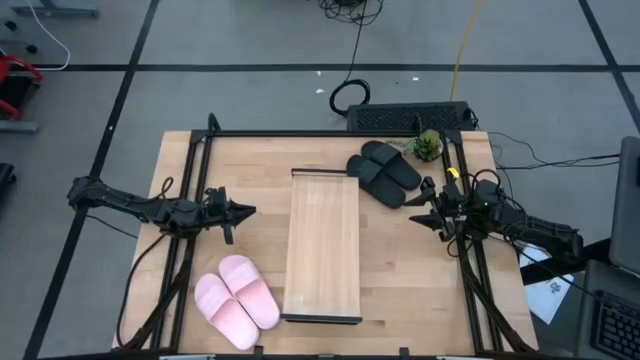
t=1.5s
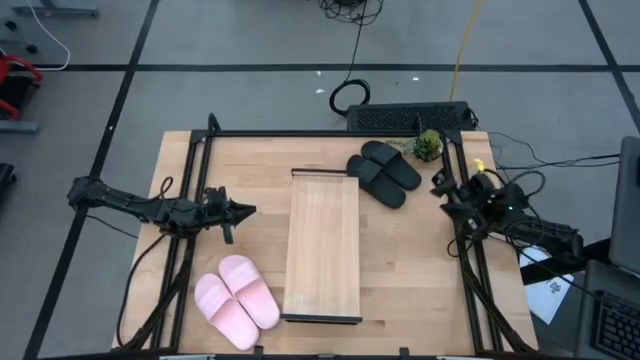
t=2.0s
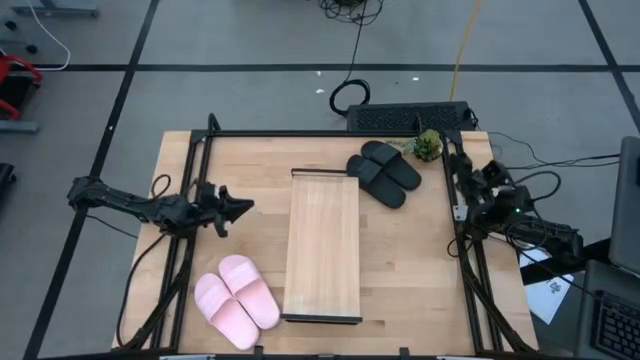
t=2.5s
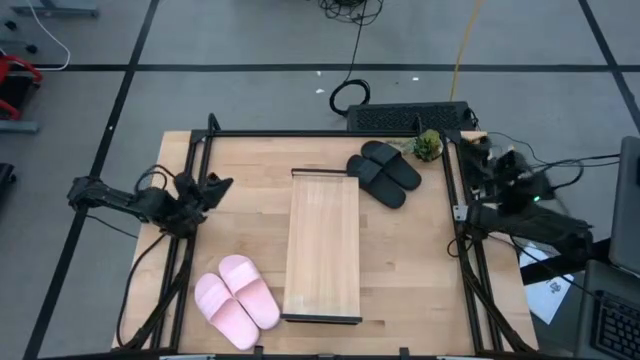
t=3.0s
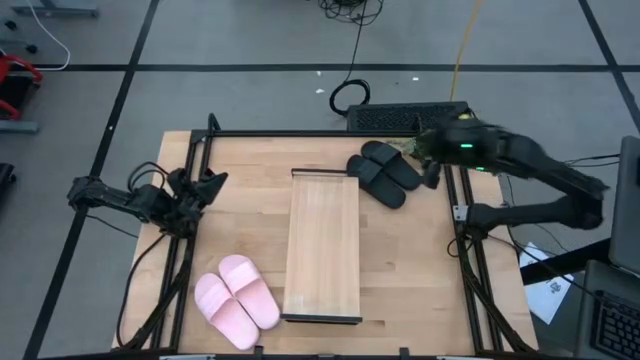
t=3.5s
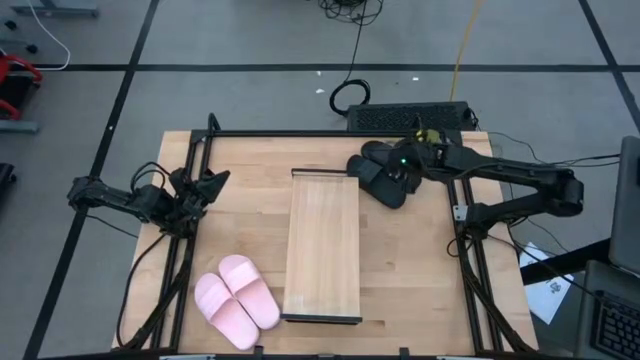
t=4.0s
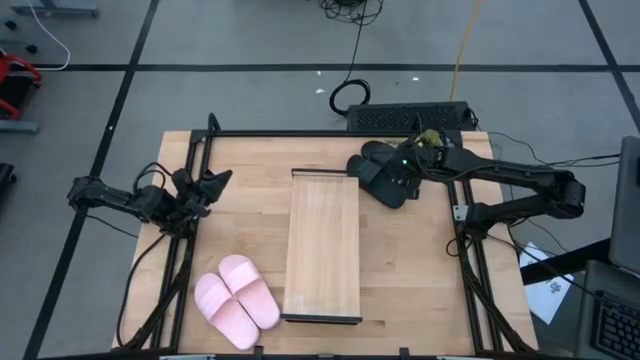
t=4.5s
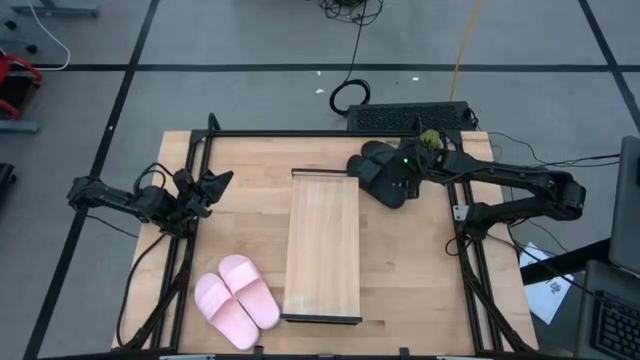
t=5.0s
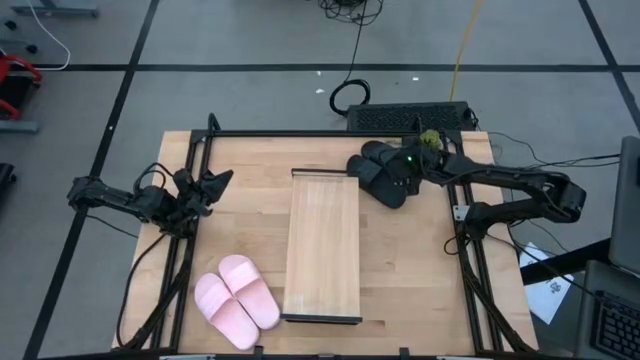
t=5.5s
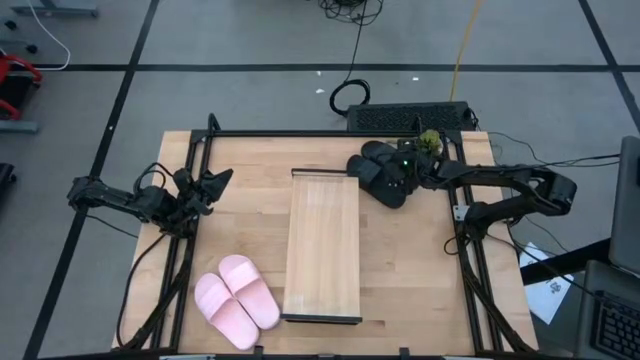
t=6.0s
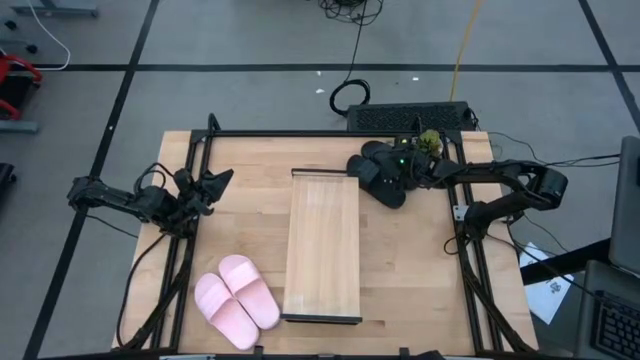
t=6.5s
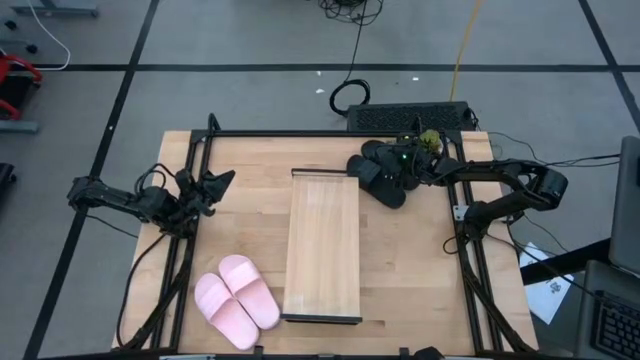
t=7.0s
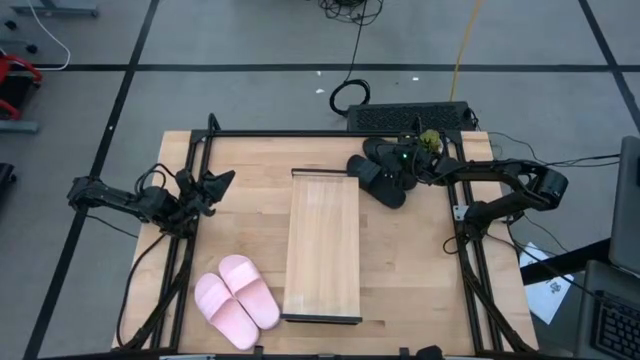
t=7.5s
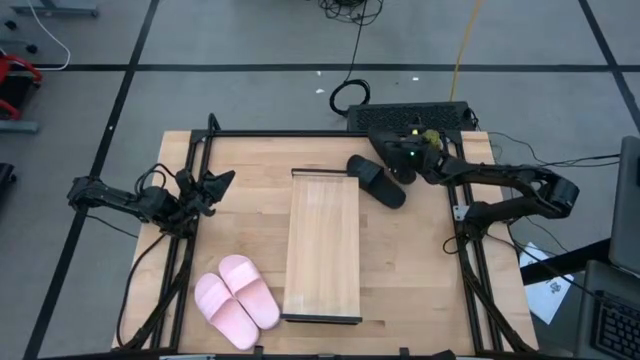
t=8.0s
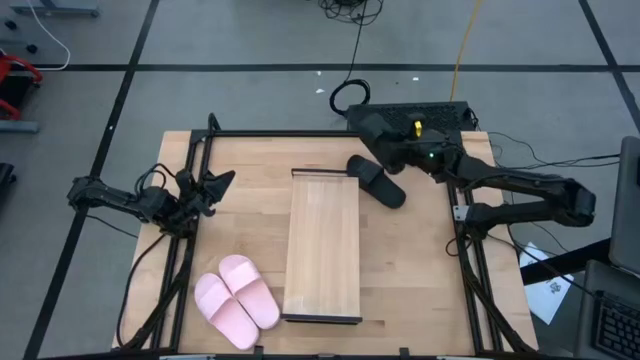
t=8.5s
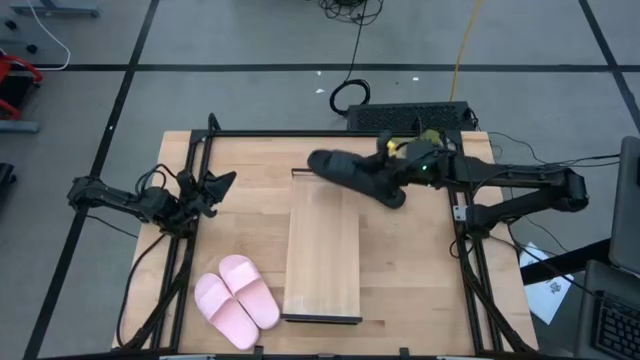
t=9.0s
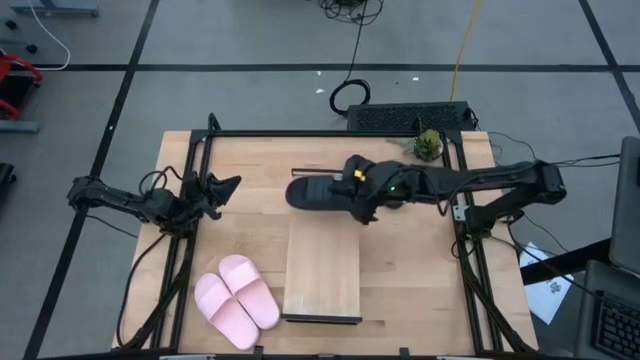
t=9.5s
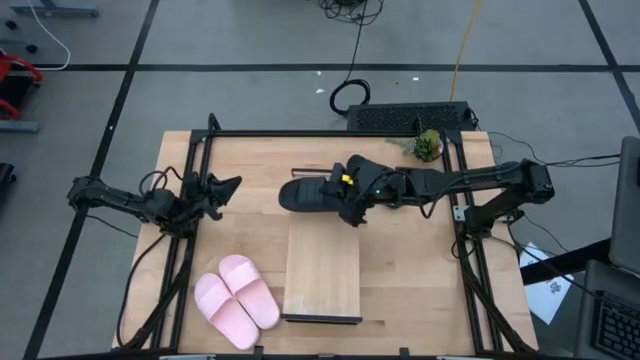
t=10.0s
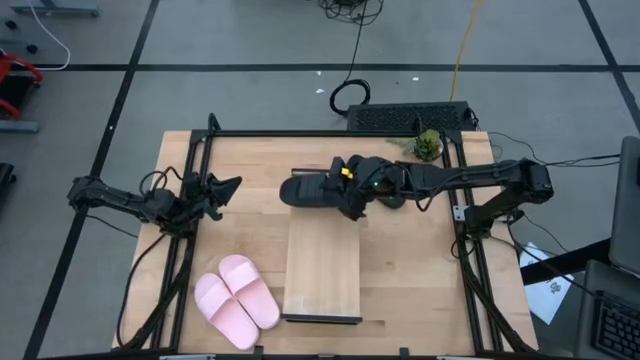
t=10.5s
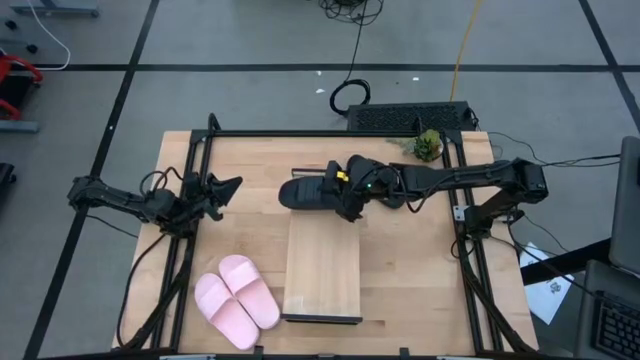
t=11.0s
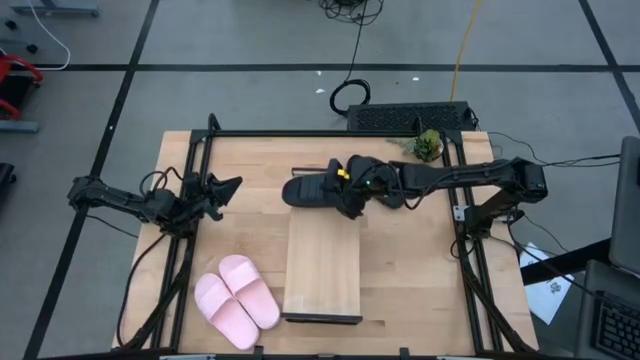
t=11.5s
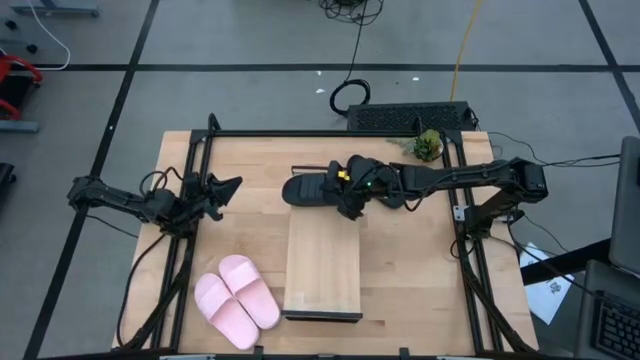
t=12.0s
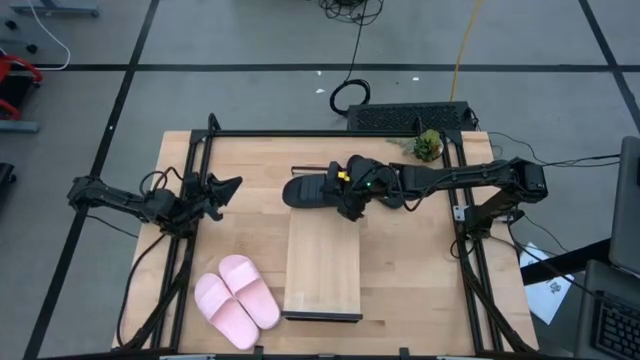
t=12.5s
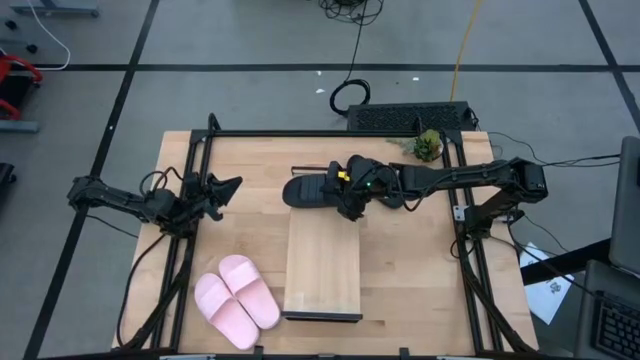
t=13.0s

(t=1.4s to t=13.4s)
Task: Pick and place slides into the shelf
Put the right black slide on the shelf

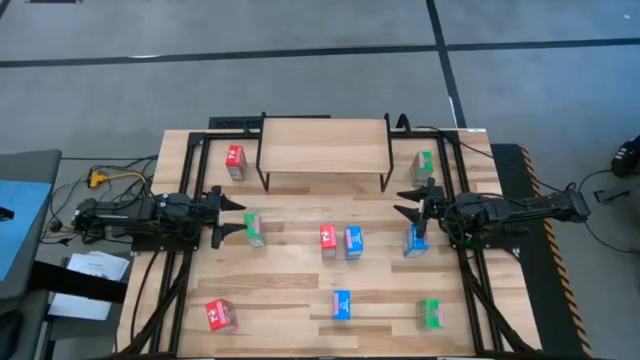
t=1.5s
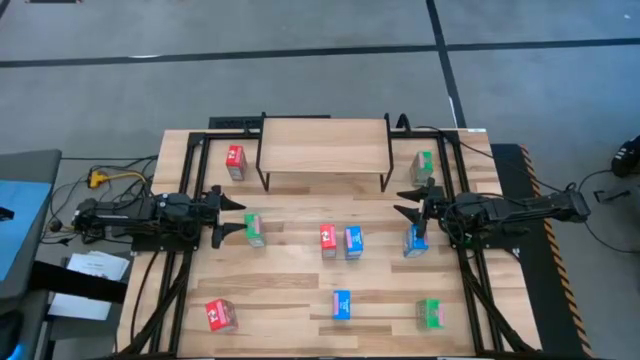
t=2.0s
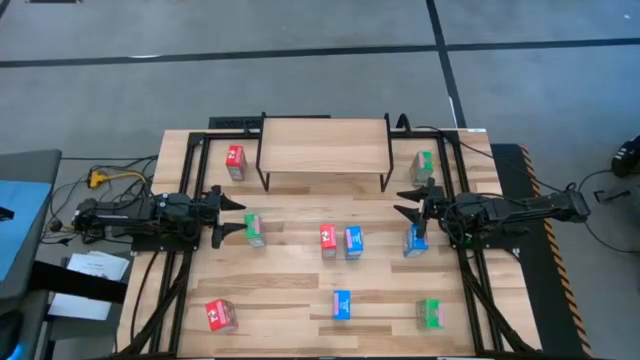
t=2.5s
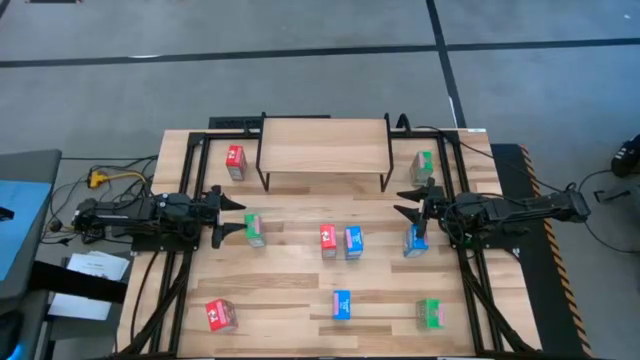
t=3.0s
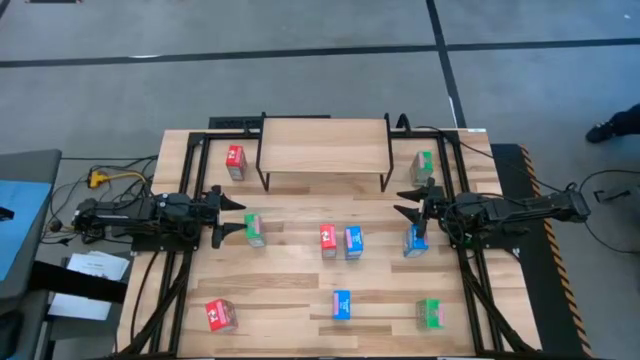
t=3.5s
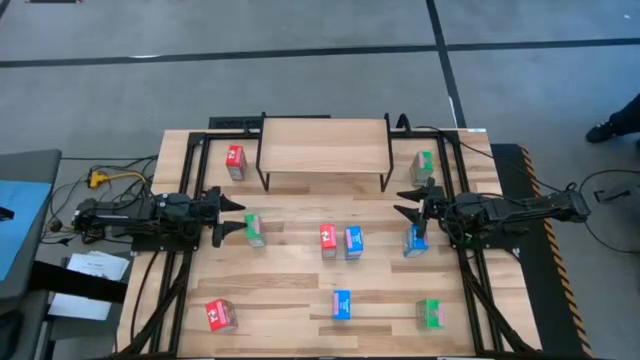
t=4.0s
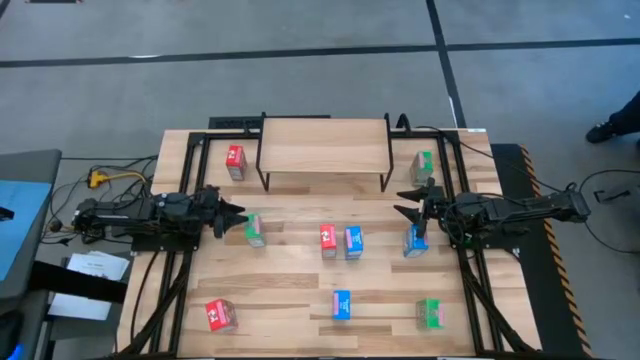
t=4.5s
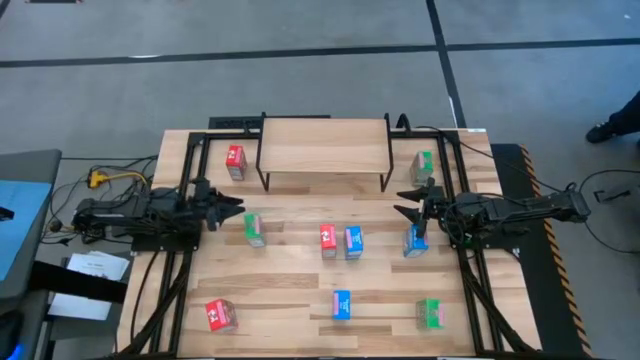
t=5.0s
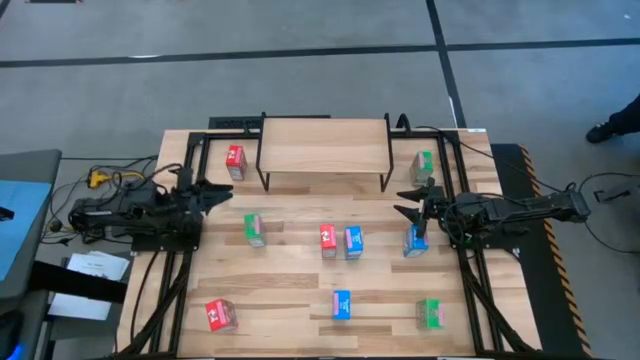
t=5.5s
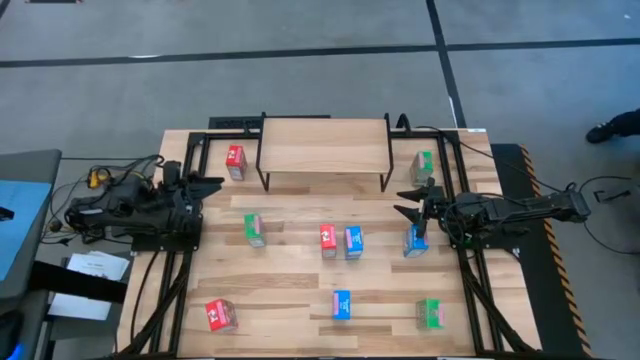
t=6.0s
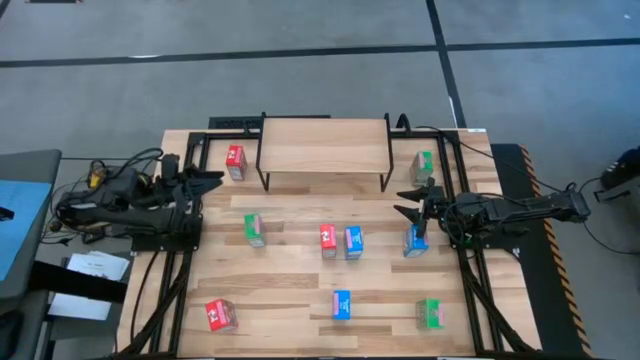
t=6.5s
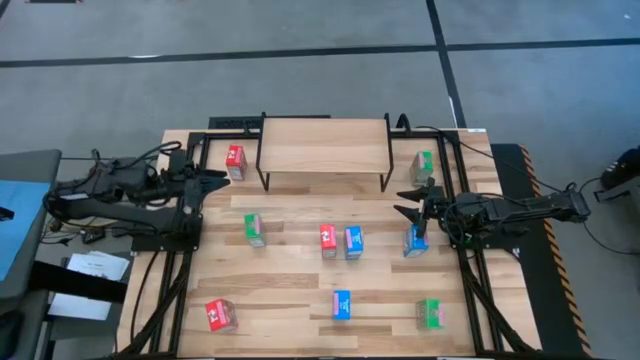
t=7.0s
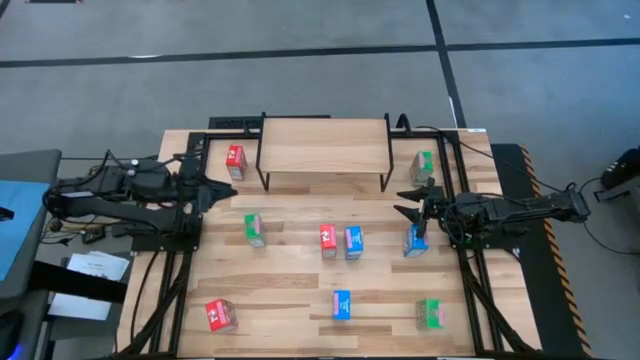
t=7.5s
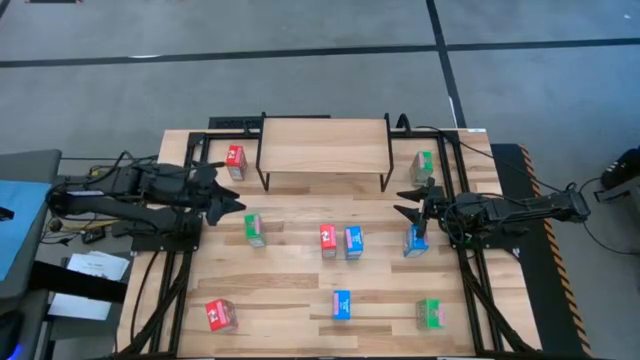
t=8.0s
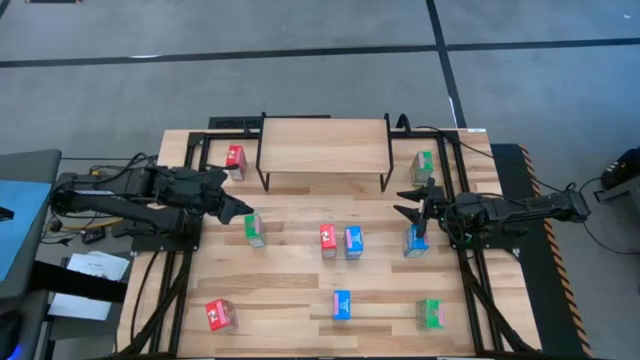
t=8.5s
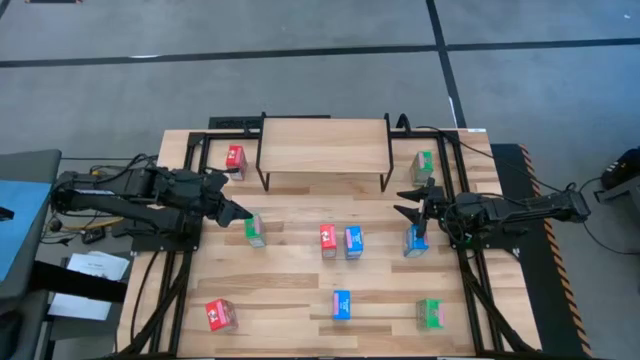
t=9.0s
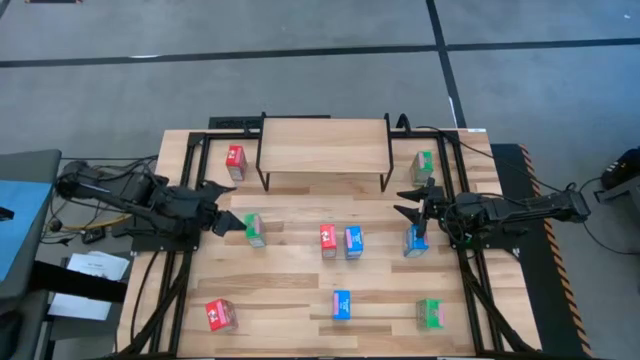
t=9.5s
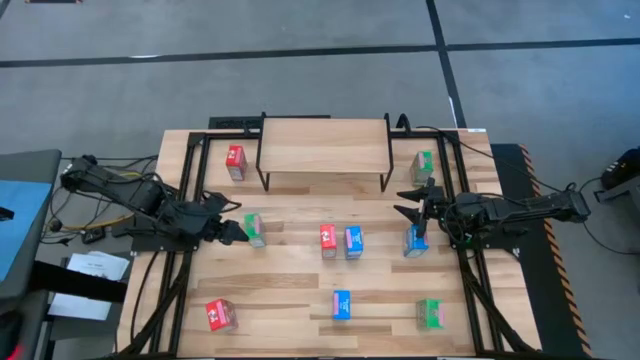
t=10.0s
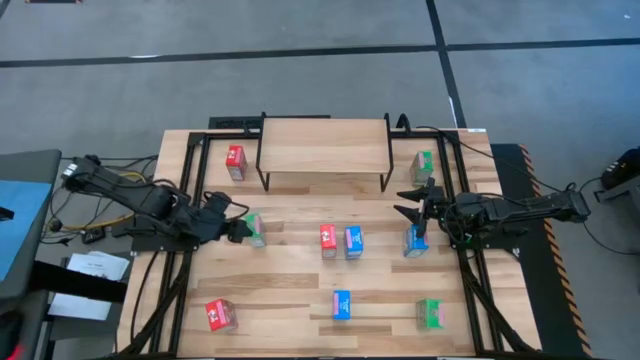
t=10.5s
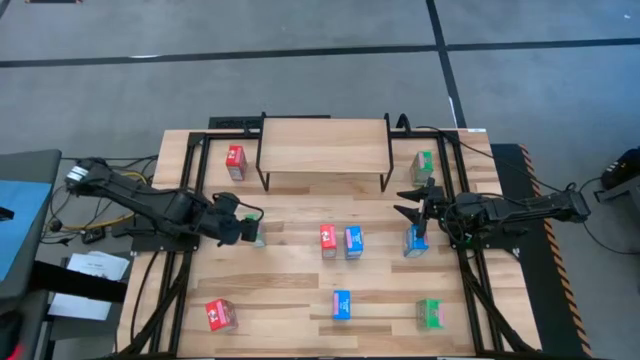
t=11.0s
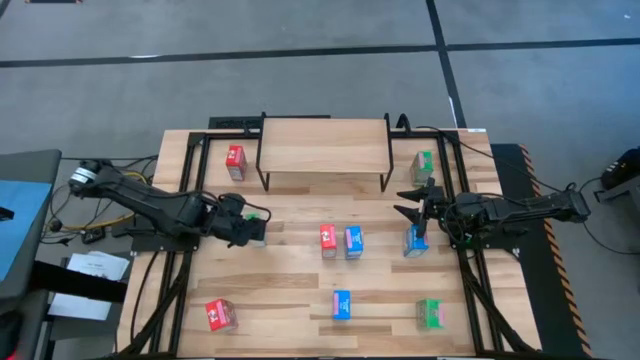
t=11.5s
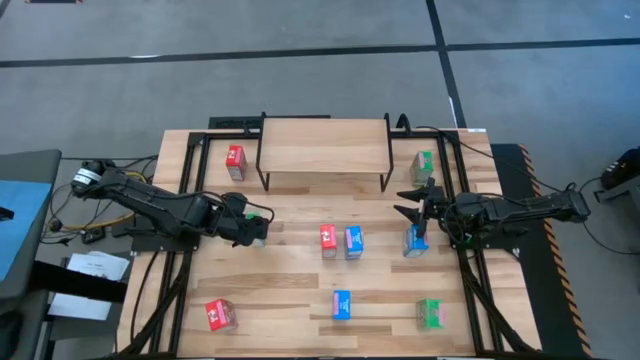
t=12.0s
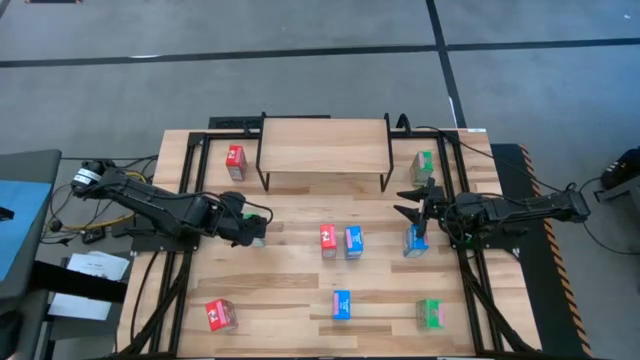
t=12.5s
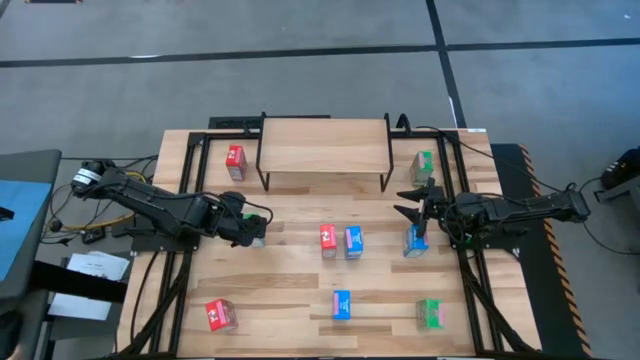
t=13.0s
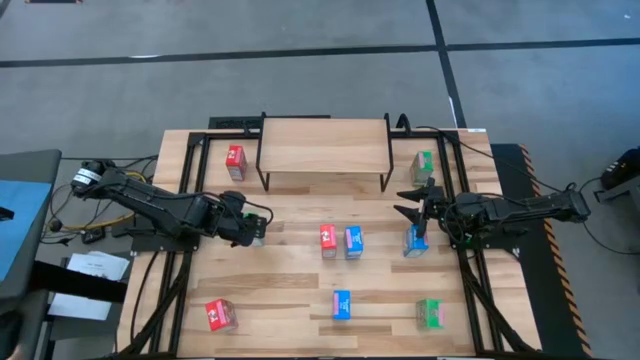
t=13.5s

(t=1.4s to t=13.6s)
Task: Stack cereal on shelf
Put the middle left green cereal box on the shelf
